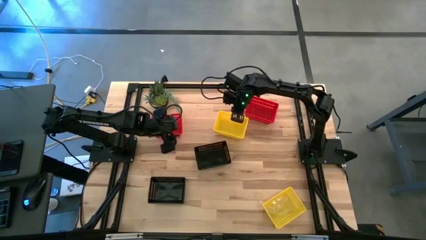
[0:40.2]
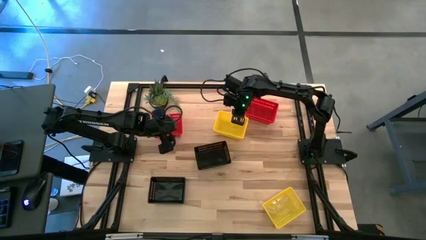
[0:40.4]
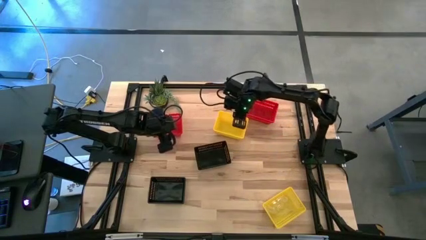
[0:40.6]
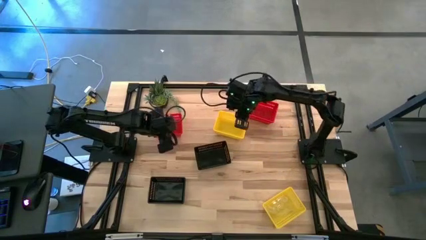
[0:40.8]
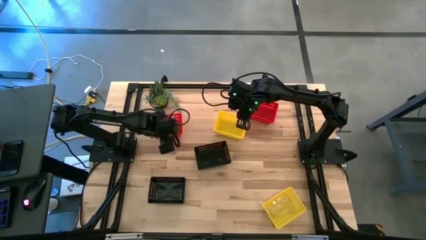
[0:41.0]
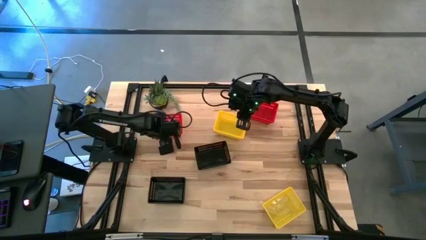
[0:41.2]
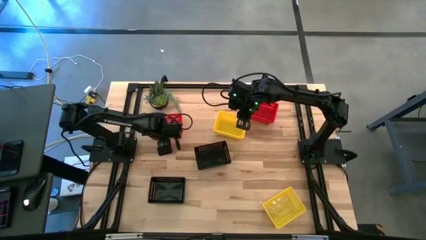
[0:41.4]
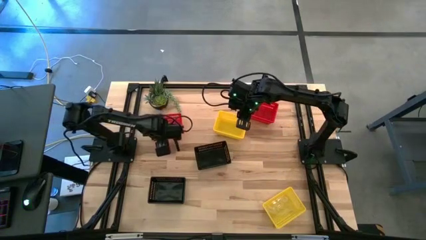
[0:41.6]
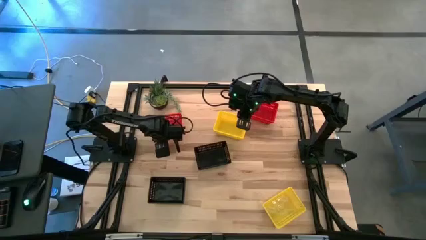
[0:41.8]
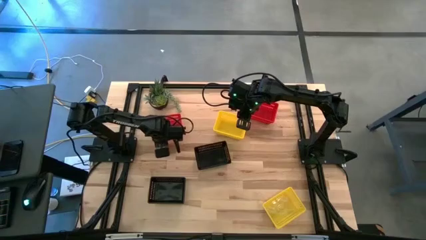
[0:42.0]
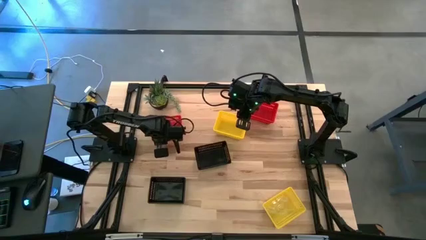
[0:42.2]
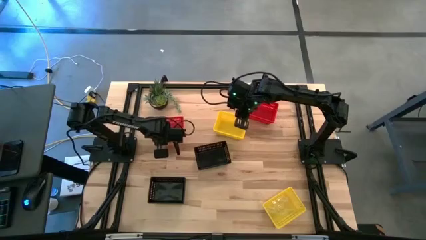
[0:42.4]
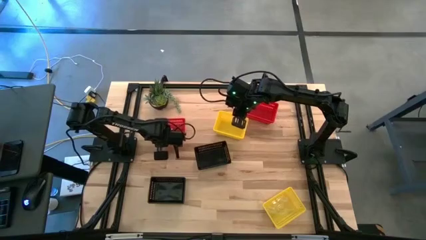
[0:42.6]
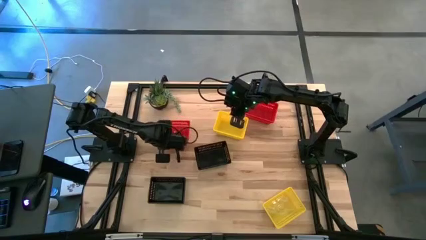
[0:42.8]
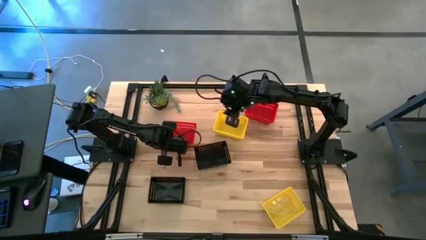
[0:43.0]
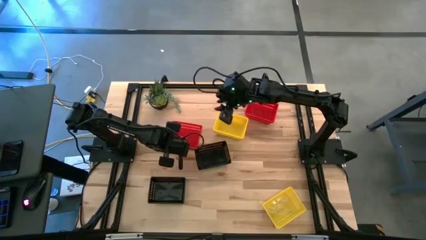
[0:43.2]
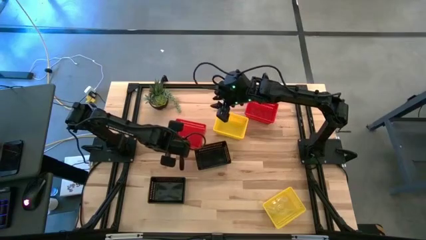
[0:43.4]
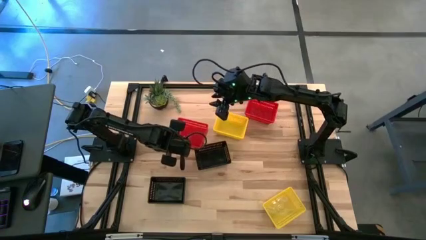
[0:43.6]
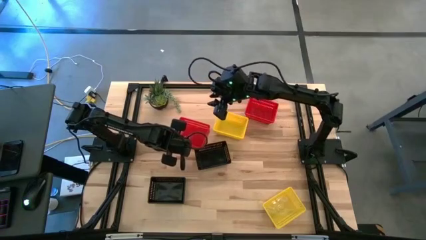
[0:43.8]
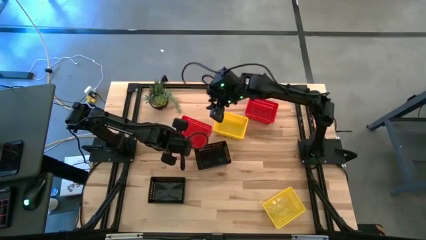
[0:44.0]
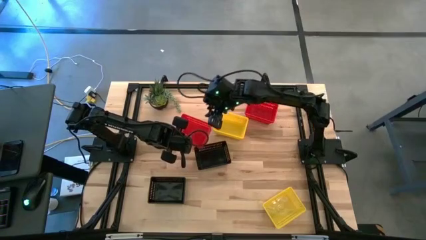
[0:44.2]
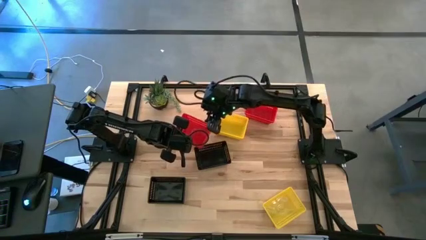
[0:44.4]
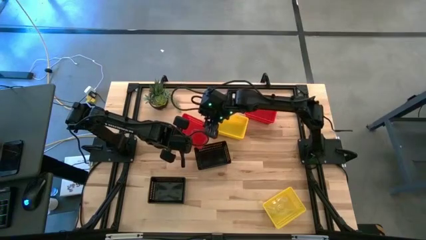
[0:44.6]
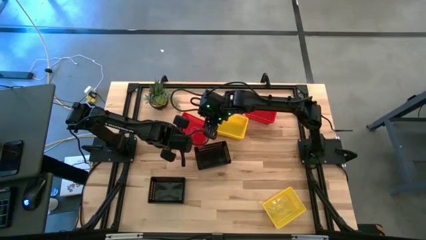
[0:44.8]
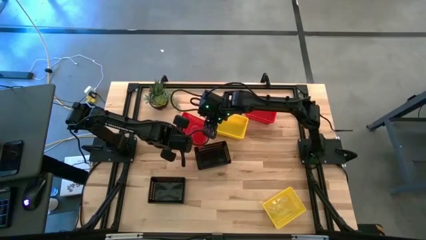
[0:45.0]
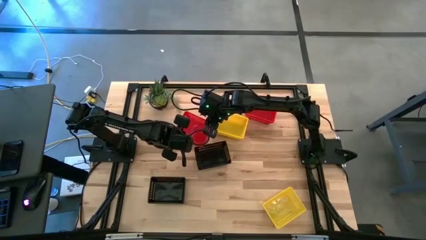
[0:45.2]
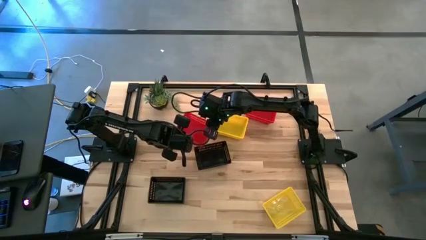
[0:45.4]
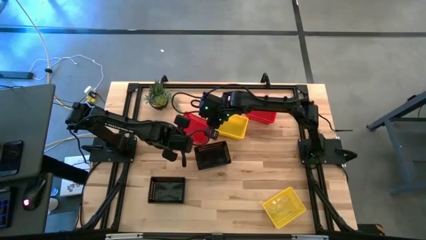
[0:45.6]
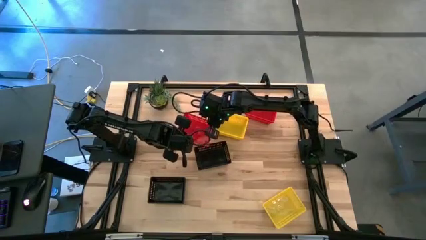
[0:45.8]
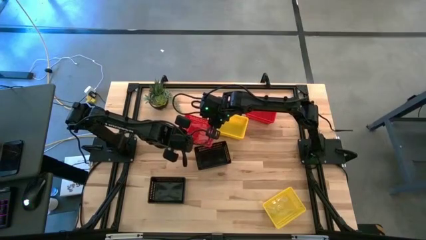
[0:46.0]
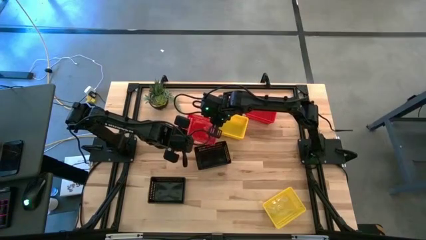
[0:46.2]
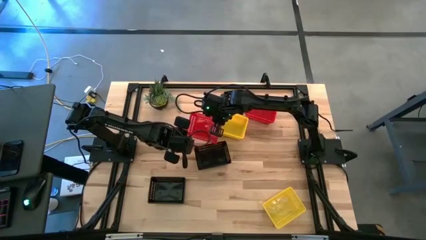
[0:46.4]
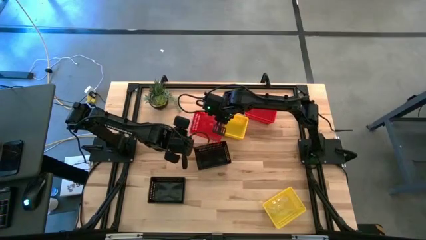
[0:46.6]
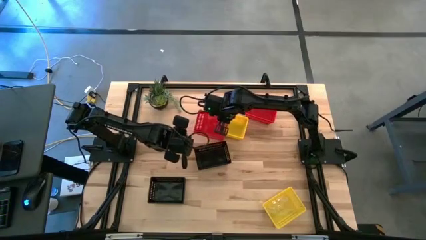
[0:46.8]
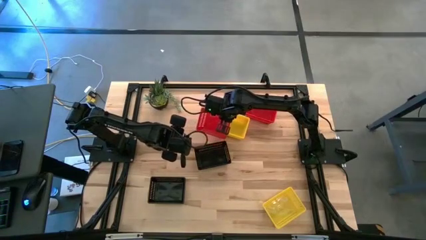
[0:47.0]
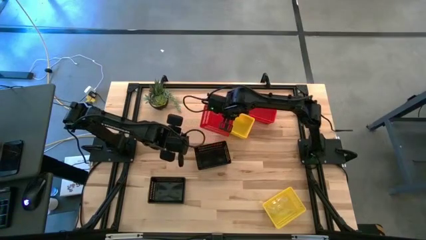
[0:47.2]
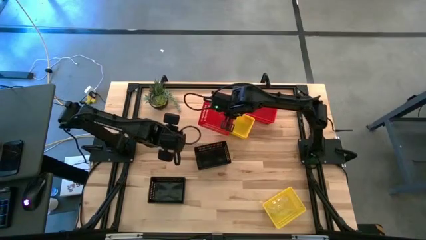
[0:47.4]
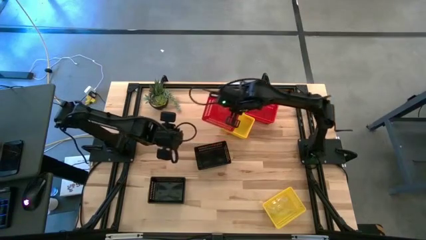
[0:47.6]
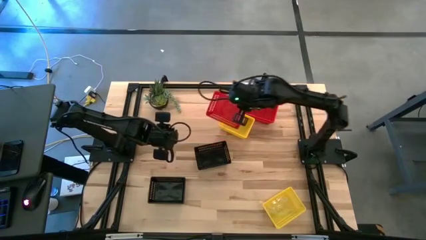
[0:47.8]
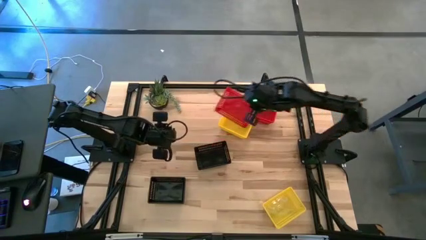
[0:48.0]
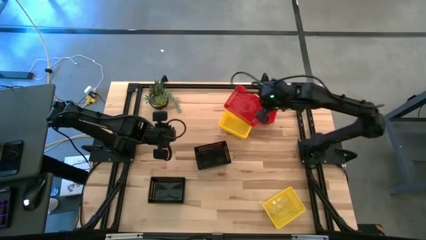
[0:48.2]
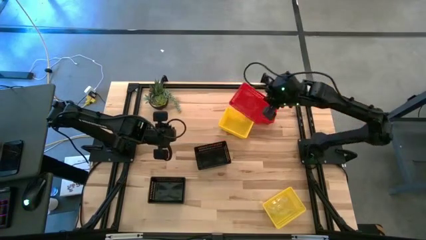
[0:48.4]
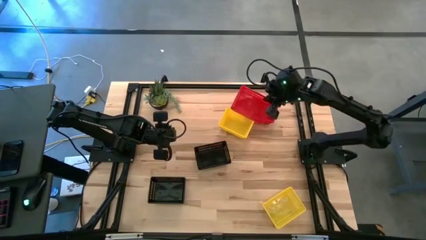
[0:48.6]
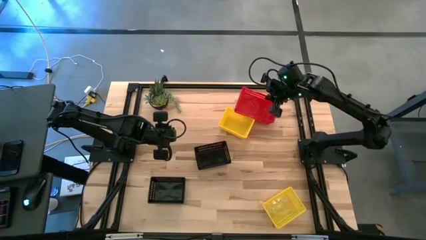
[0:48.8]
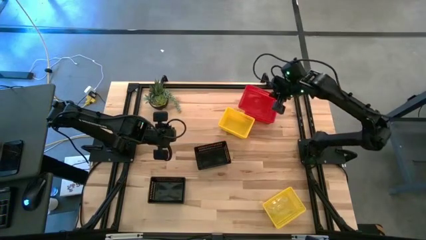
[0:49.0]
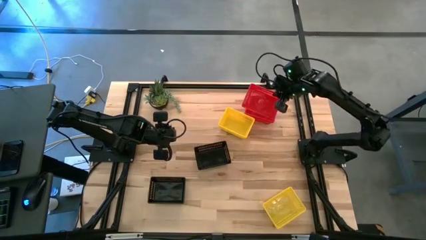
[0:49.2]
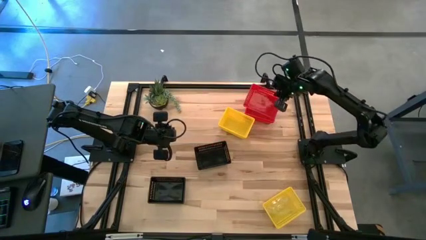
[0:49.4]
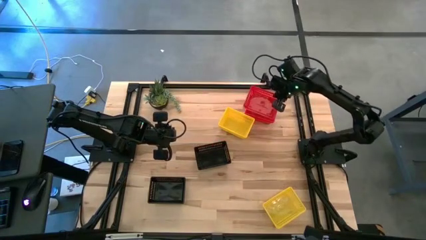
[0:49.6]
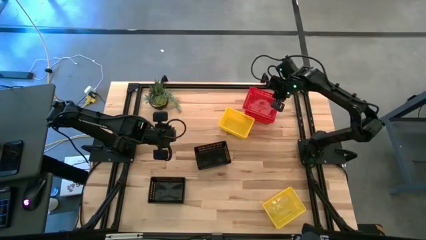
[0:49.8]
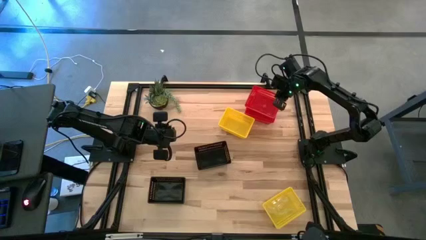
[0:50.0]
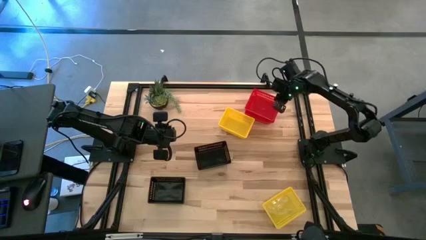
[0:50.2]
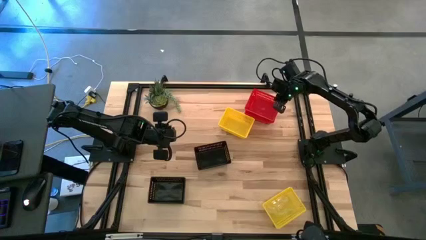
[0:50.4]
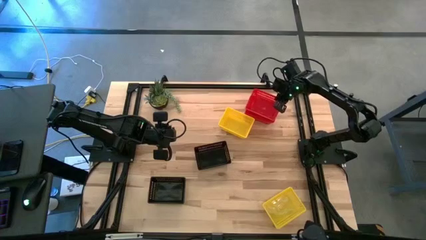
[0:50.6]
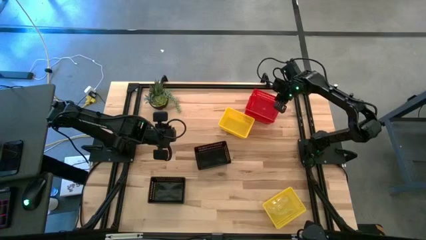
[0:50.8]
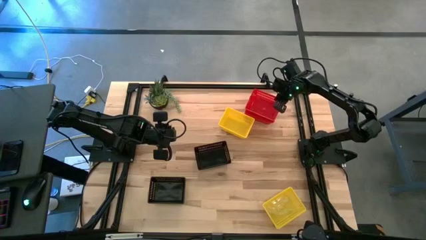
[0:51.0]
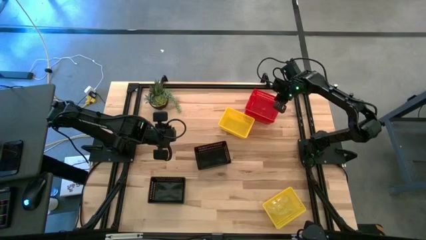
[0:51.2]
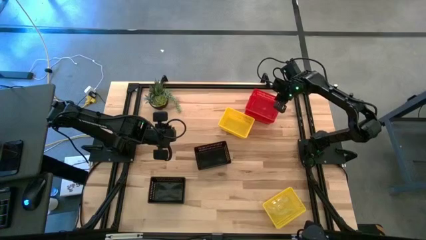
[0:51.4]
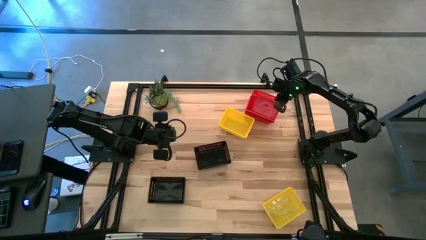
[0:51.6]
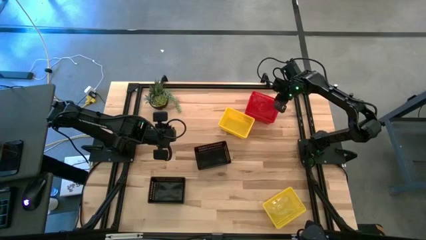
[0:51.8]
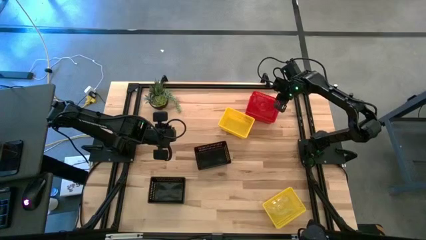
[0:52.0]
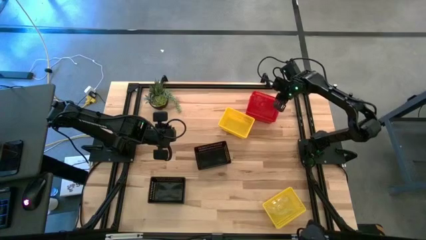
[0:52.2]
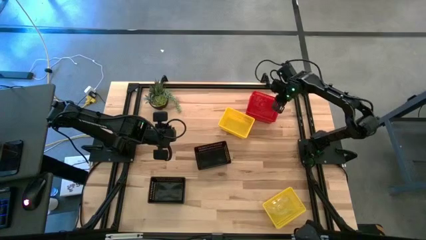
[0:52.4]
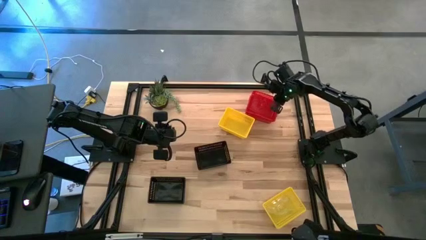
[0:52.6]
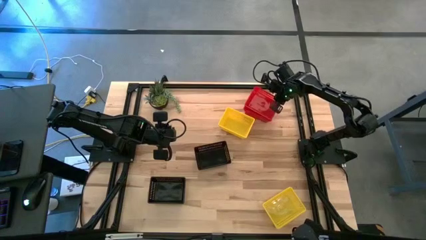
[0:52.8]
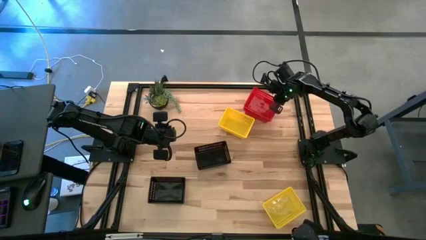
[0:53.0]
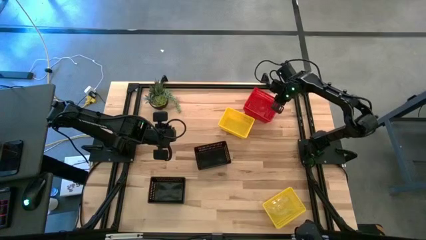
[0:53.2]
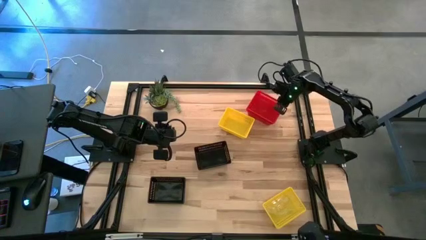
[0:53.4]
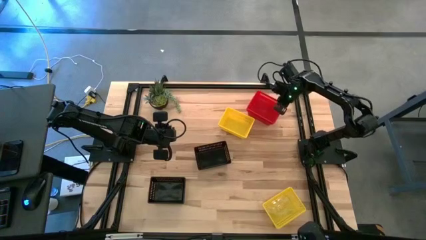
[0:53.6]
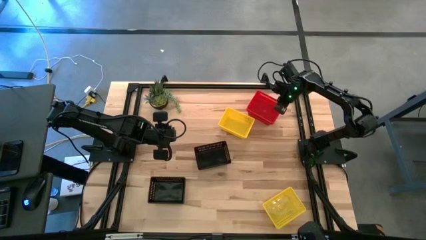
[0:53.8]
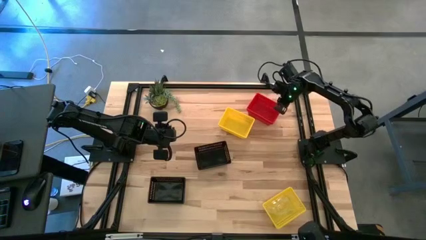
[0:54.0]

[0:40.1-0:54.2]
Stack the red bin on top of the red bin stack
